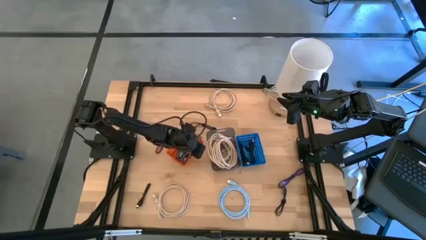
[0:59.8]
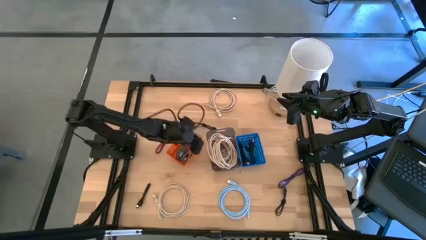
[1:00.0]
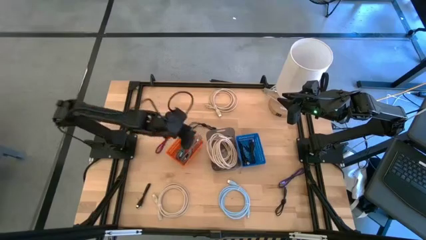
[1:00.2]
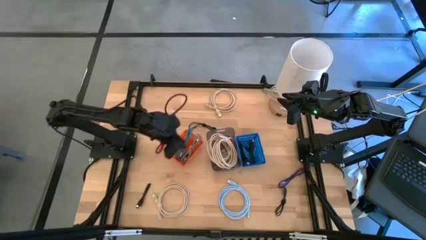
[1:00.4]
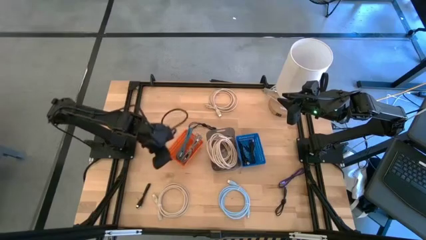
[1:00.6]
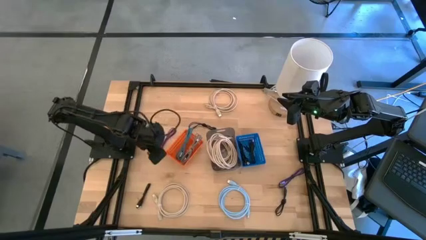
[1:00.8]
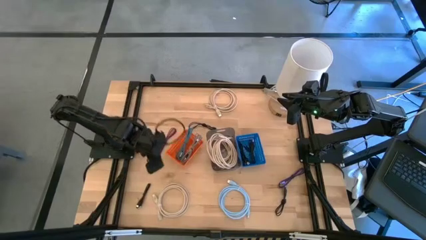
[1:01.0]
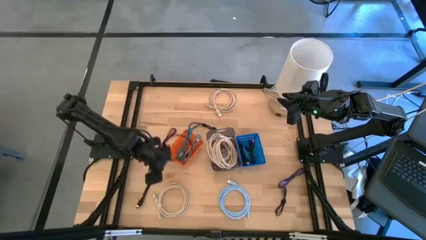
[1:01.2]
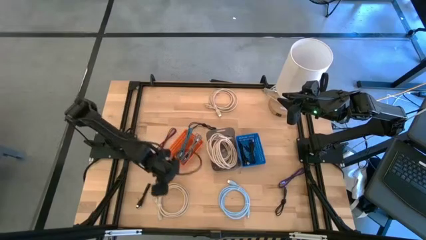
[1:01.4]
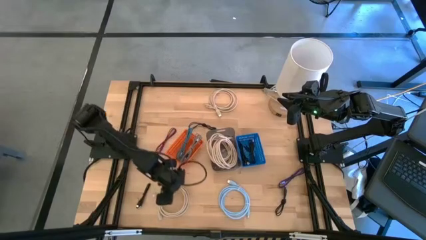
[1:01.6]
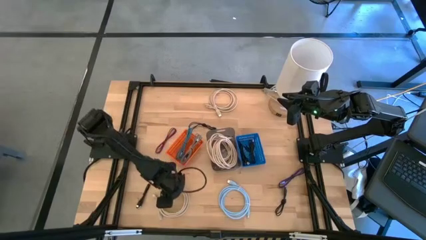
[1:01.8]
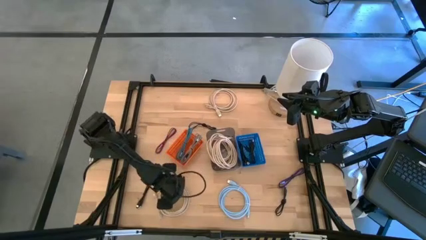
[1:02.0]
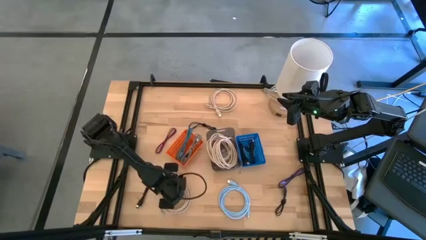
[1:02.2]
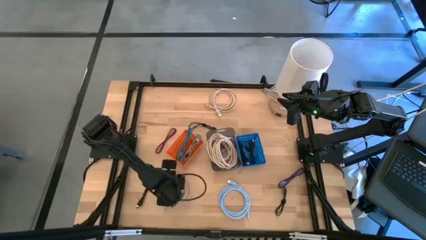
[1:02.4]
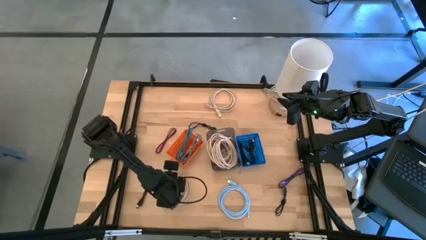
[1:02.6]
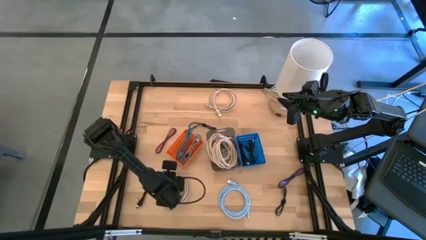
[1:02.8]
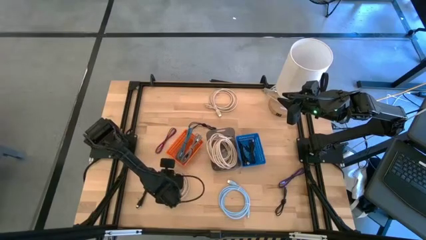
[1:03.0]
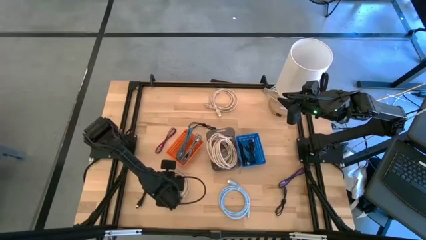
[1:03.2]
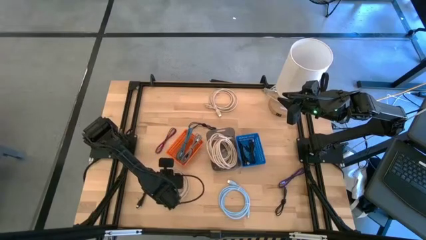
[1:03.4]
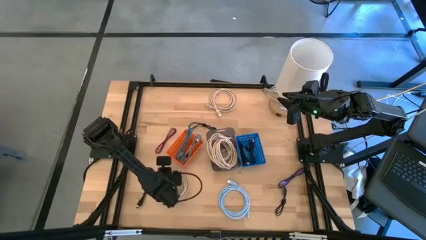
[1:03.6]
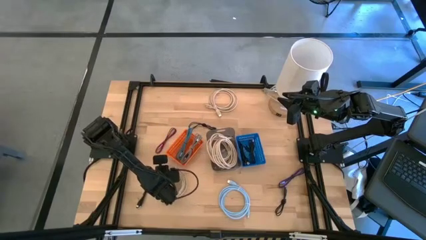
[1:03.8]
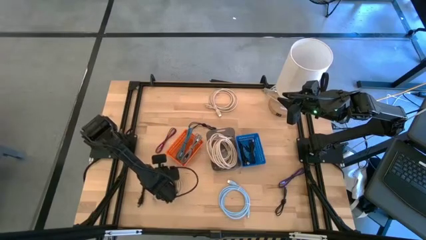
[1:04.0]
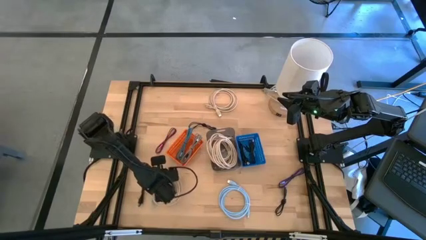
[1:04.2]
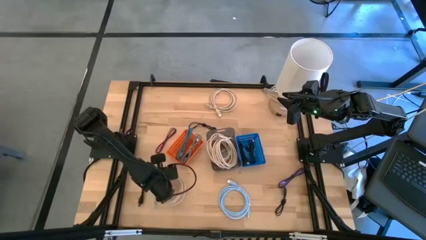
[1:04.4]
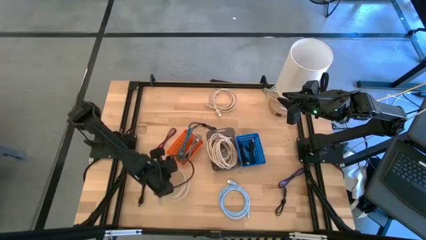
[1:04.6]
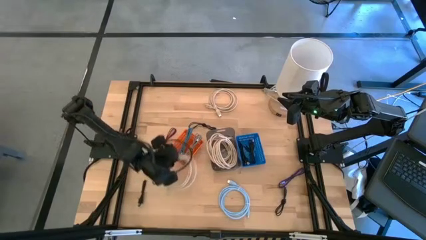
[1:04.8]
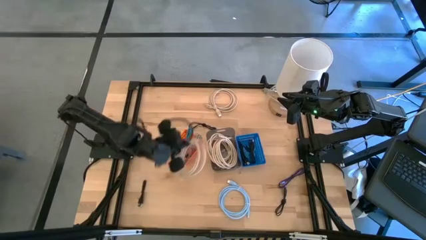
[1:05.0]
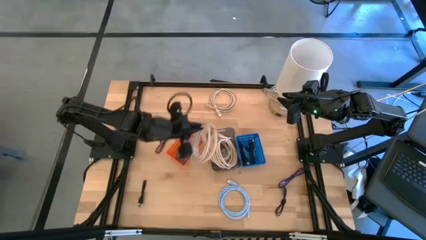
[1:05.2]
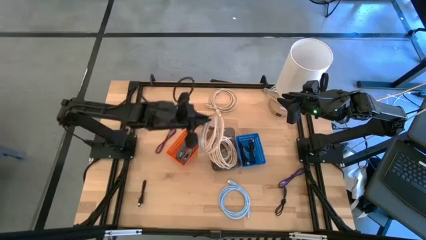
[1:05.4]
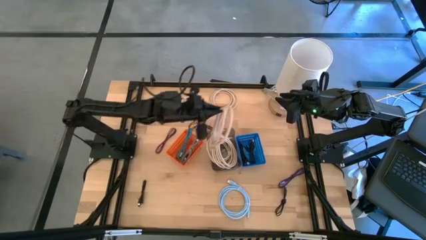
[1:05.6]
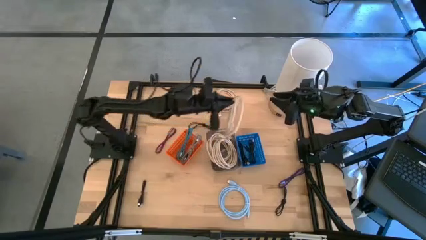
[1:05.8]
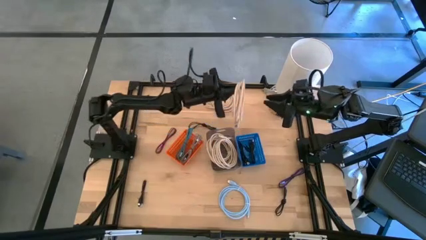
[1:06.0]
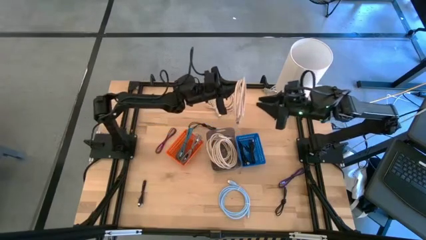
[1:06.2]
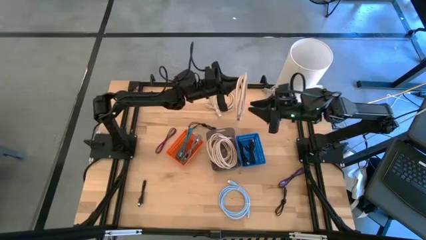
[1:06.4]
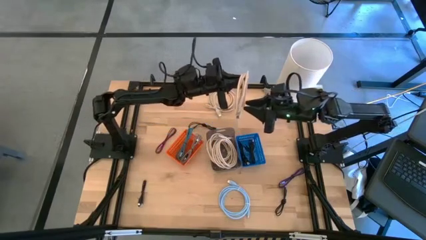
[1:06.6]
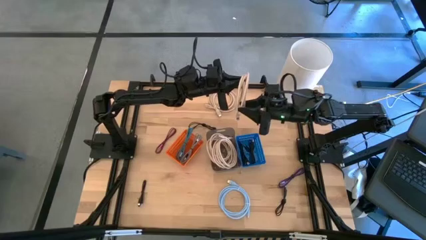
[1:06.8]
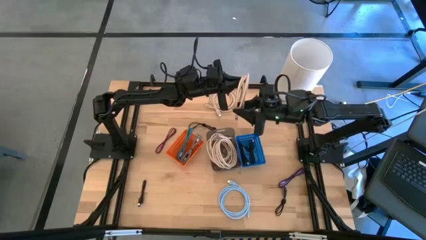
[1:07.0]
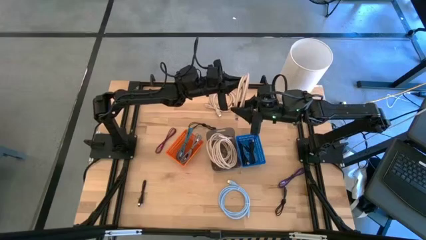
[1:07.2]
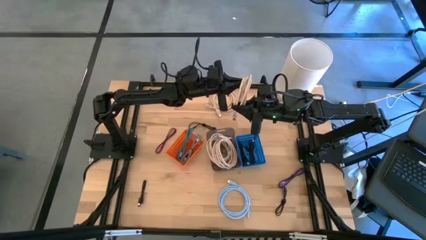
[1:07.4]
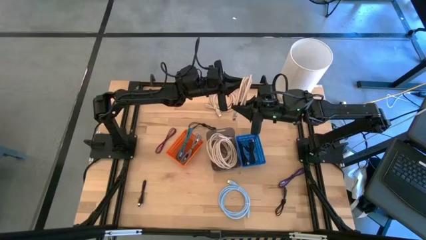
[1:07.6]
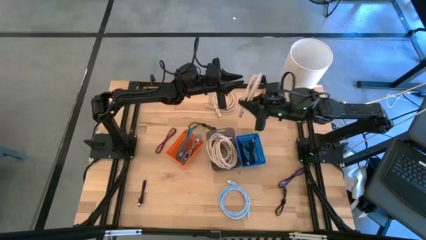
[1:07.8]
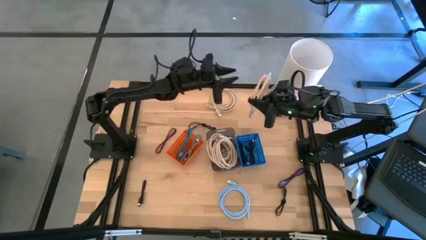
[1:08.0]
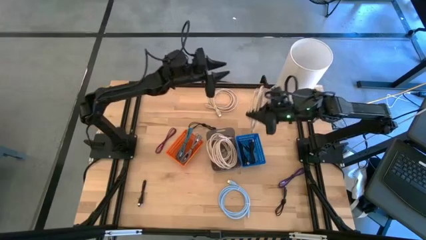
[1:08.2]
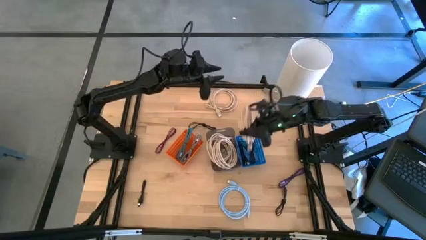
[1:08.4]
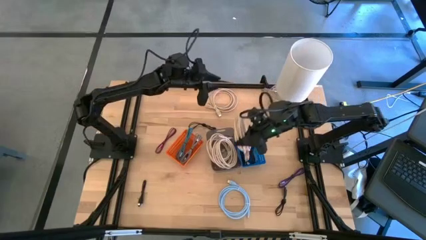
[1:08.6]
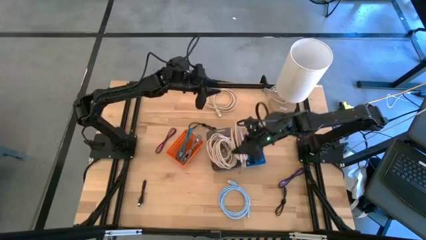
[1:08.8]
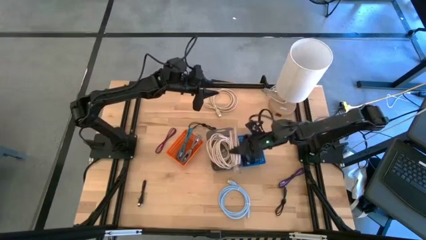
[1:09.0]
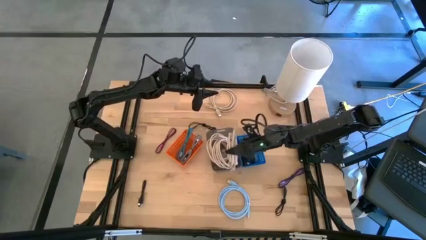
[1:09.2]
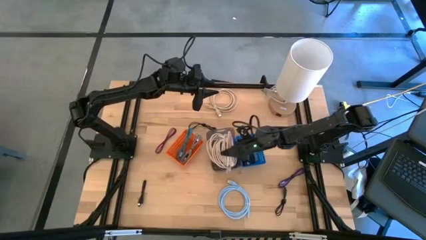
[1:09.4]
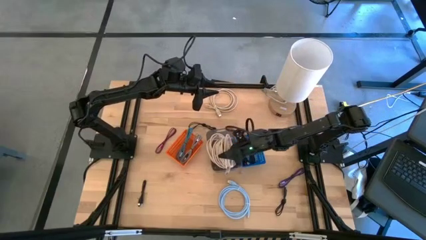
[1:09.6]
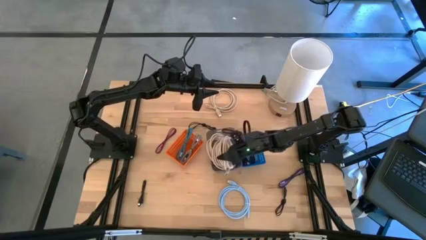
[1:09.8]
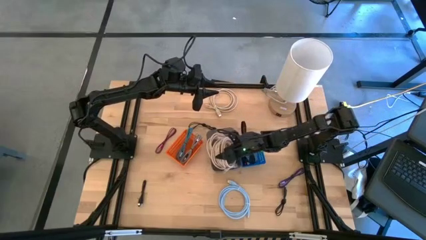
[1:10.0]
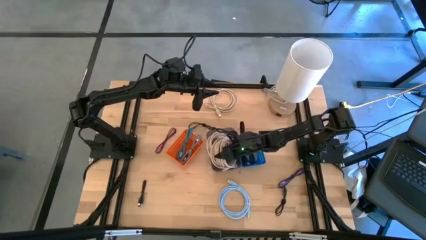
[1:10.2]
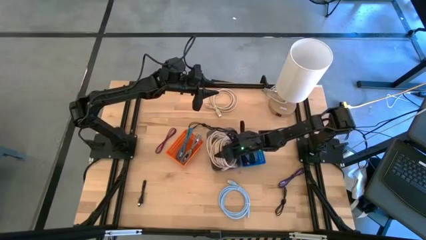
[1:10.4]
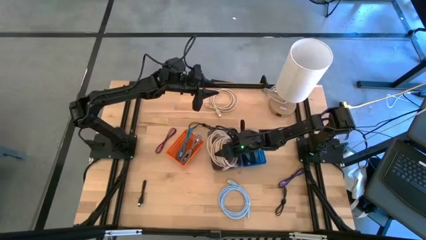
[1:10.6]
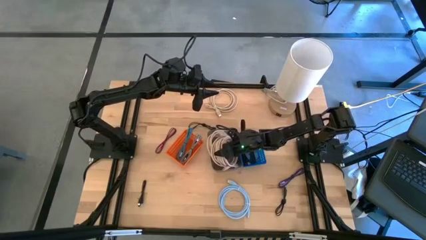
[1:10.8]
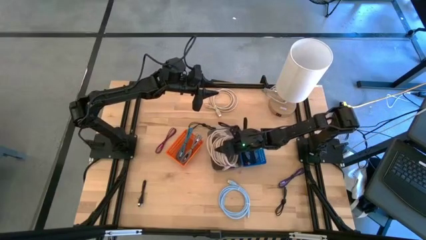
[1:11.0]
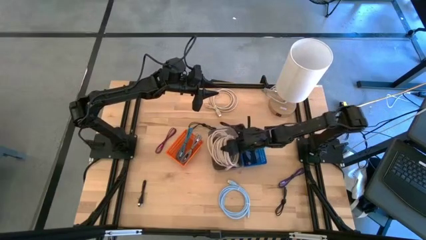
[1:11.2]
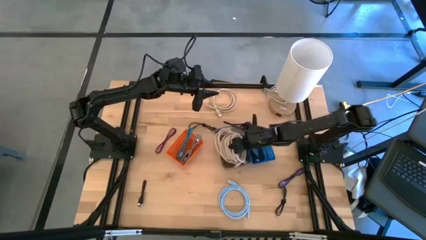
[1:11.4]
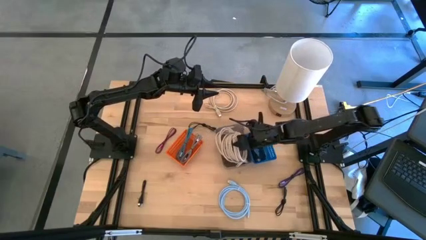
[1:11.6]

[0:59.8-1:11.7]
Task: Pick & Place USB Port
Put the light brown HDMI cable into the black bin

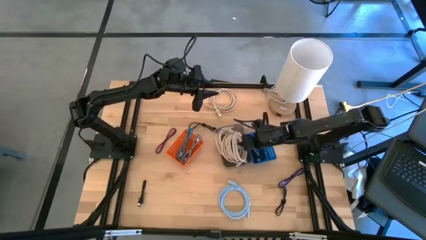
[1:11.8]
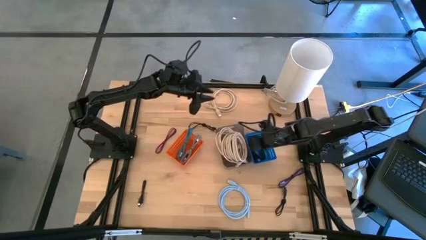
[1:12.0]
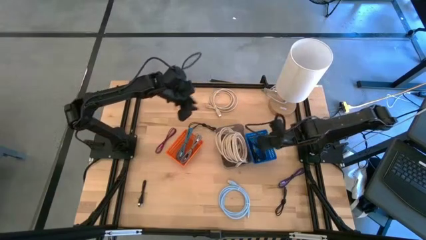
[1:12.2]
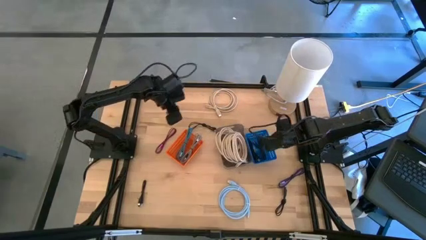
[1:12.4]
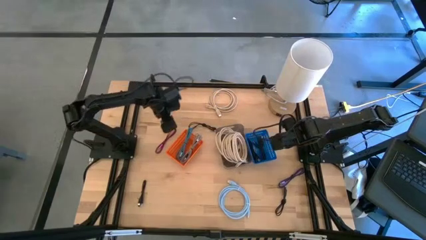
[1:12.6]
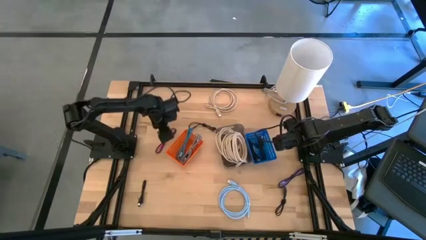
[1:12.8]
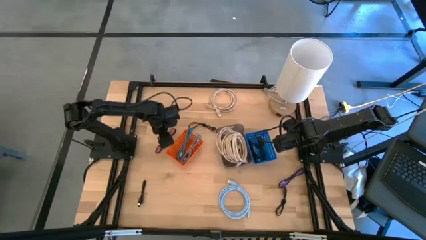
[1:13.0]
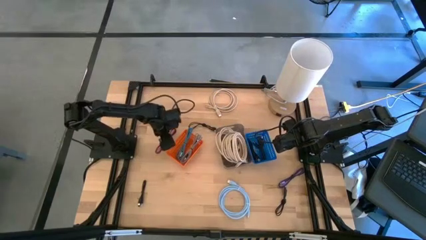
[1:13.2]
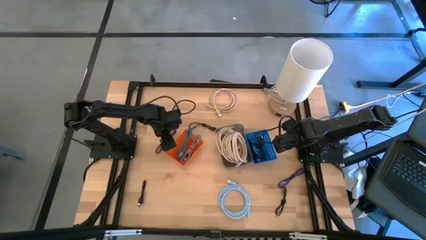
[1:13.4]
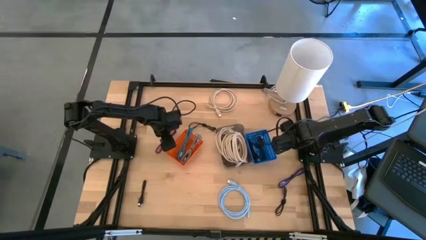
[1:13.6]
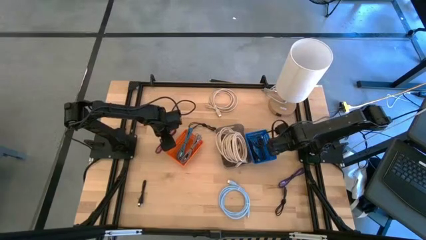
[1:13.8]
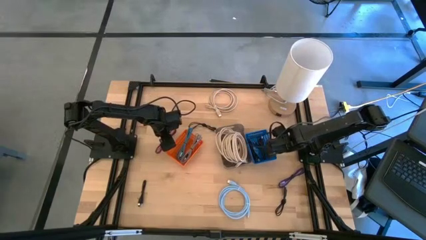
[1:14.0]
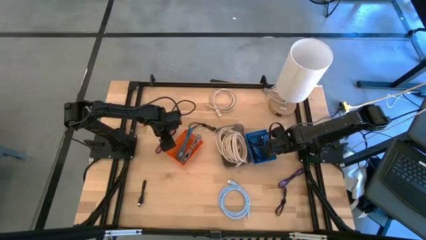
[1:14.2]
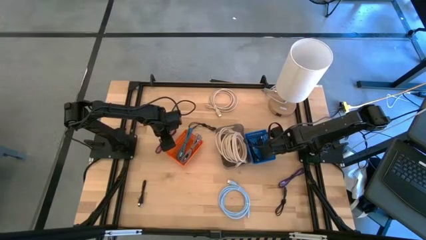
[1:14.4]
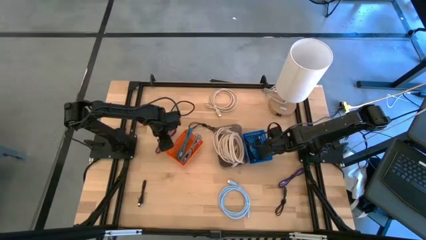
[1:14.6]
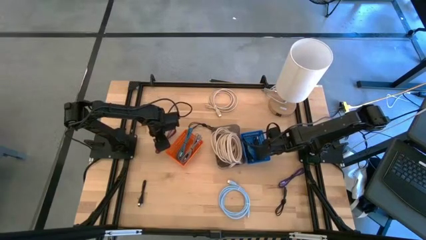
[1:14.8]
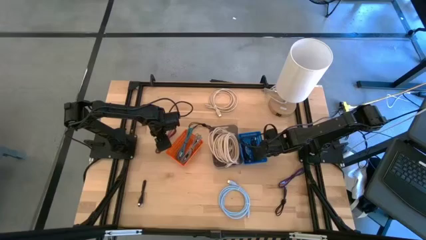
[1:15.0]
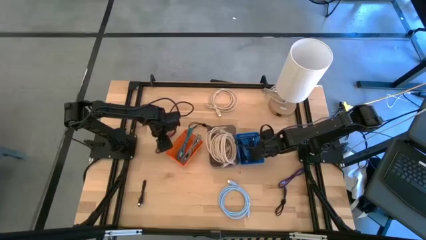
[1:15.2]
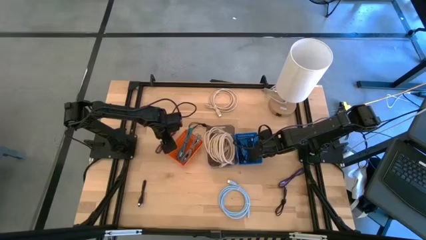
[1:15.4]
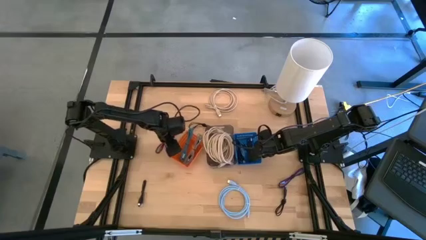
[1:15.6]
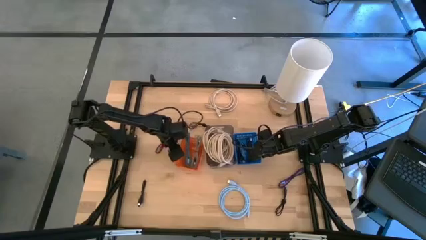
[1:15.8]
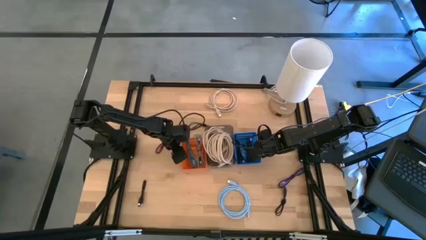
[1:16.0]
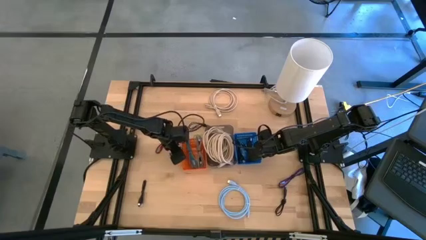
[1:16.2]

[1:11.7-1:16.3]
Adjust the bins
